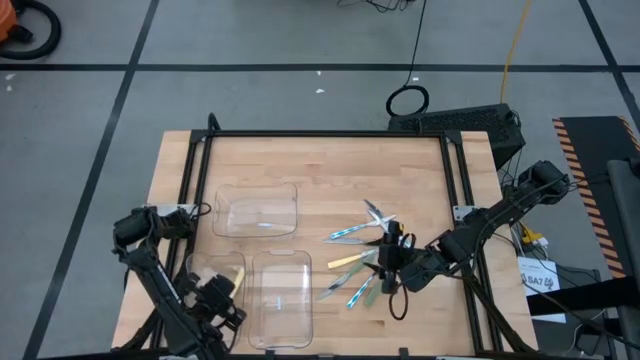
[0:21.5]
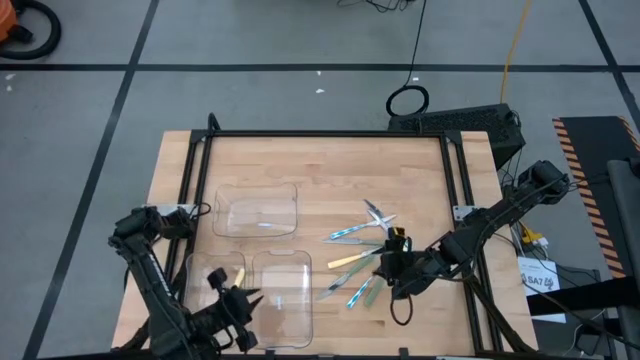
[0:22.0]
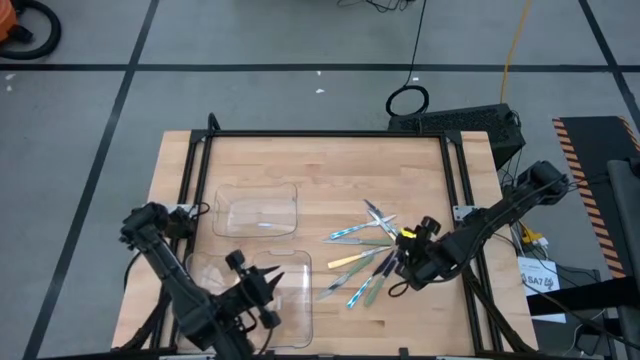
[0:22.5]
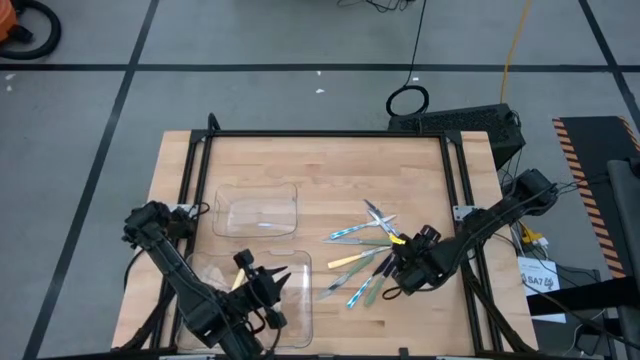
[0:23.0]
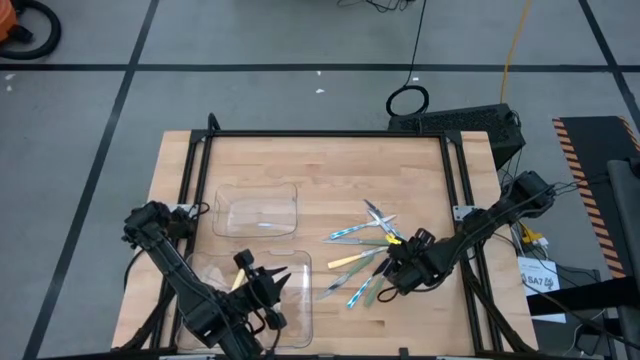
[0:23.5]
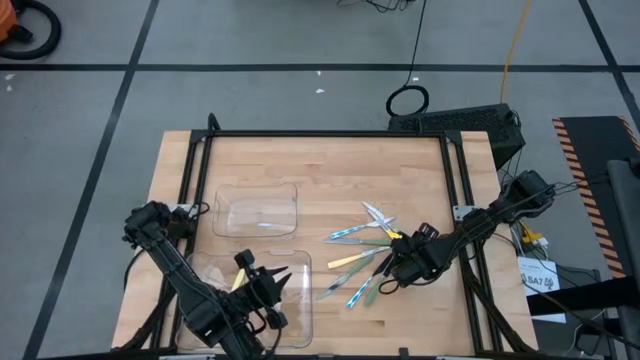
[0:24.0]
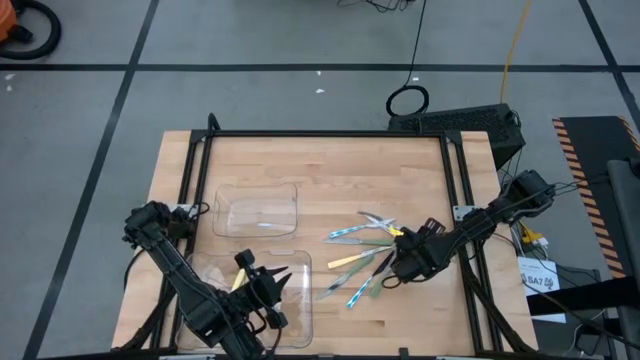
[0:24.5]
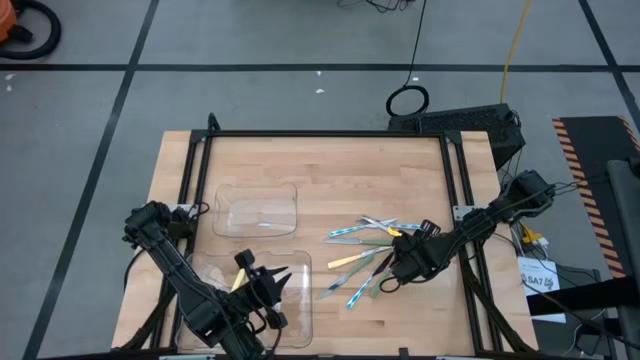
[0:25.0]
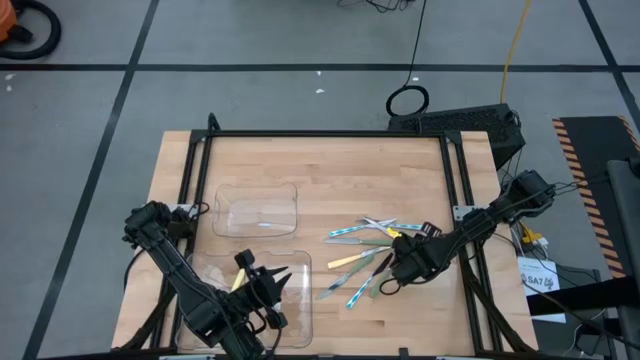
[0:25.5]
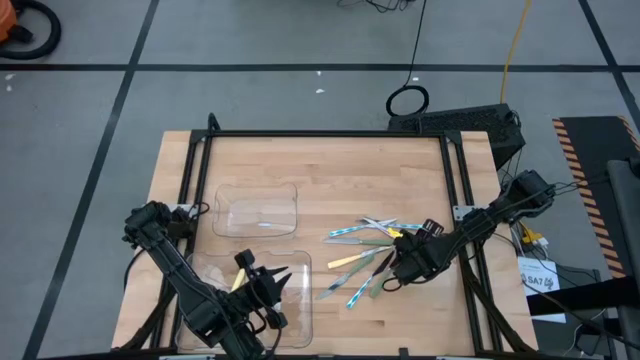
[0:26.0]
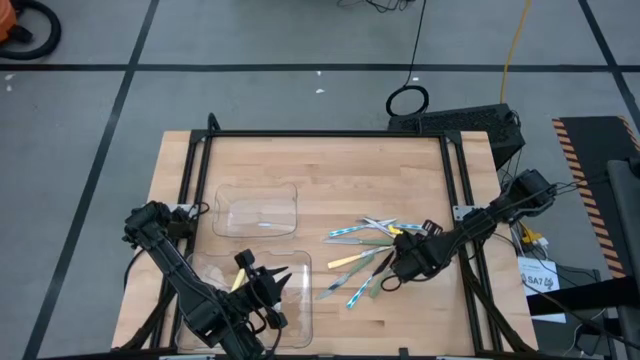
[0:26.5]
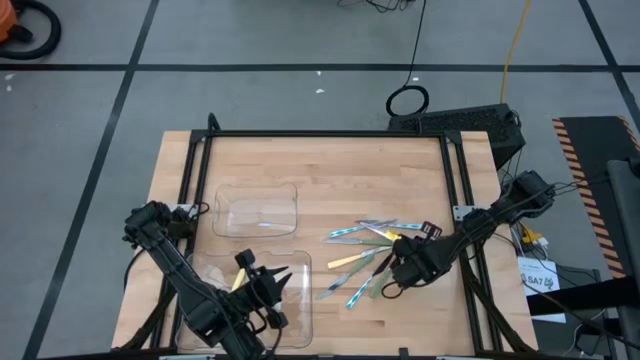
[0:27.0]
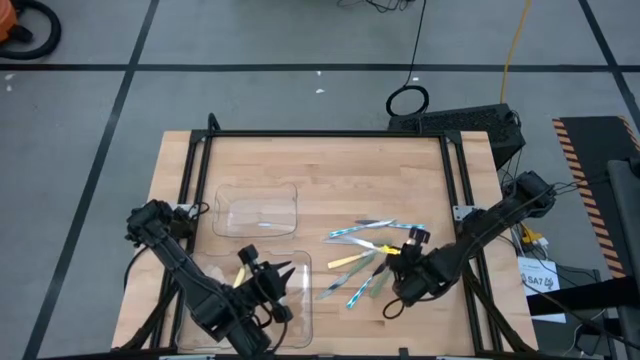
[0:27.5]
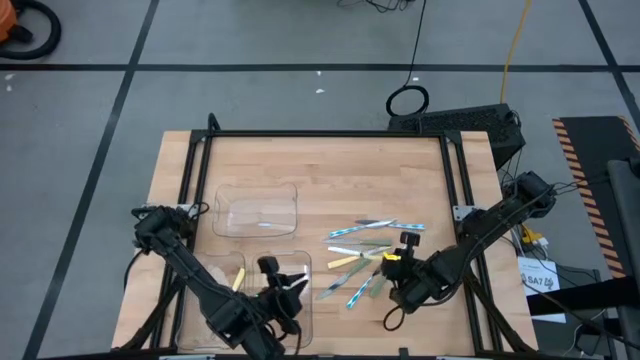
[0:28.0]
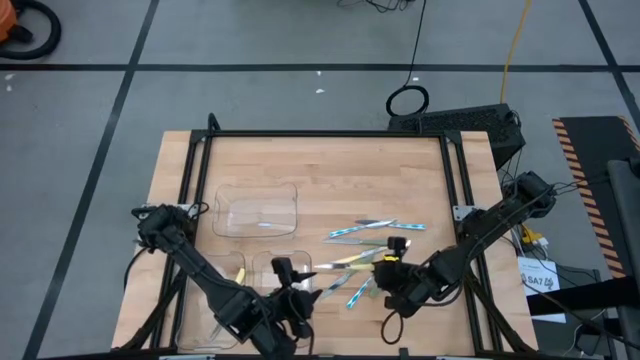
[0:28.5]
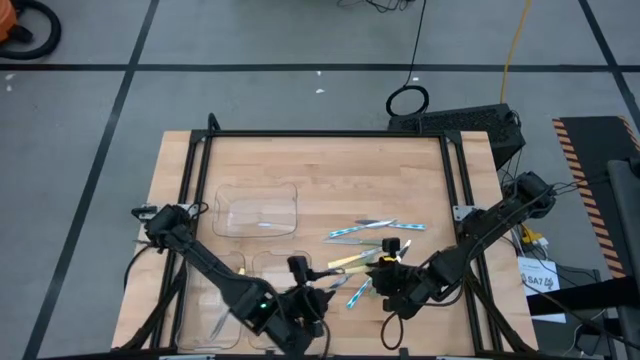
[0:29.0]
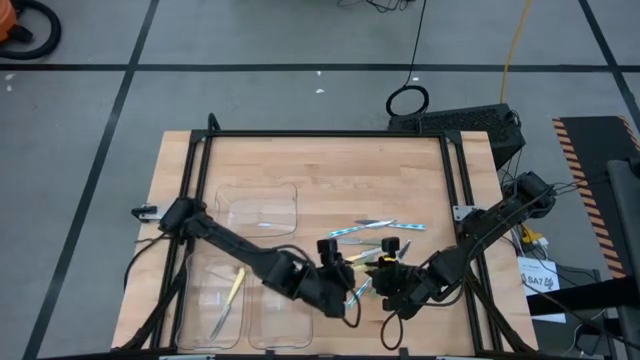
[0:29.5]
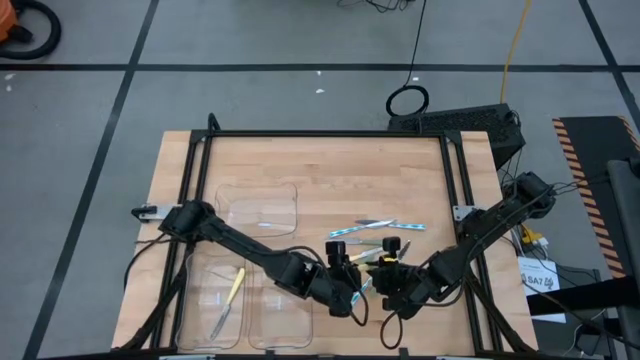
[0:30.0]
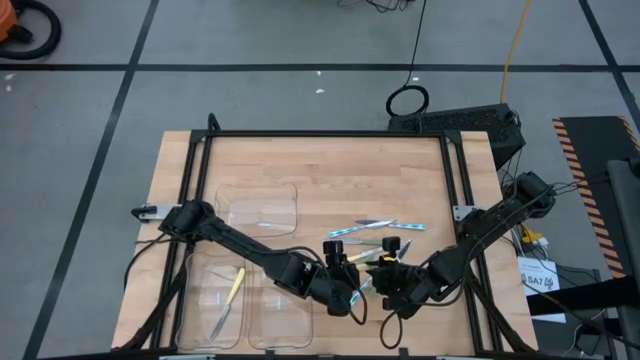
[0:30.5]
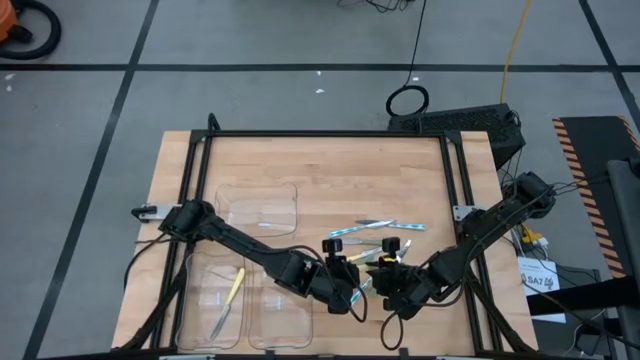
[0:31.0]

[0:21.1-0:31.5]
Task: Sort silverware by color (type)
Put the right yellow table knife into the bottom left transparent bin

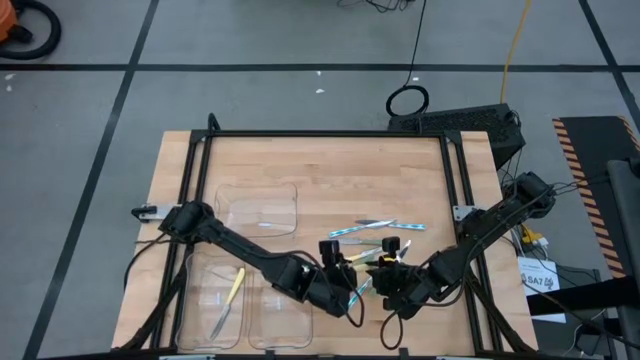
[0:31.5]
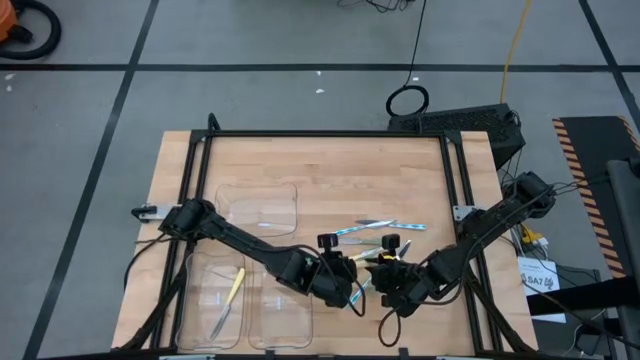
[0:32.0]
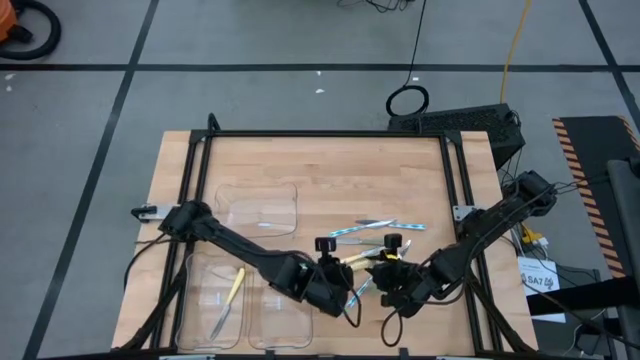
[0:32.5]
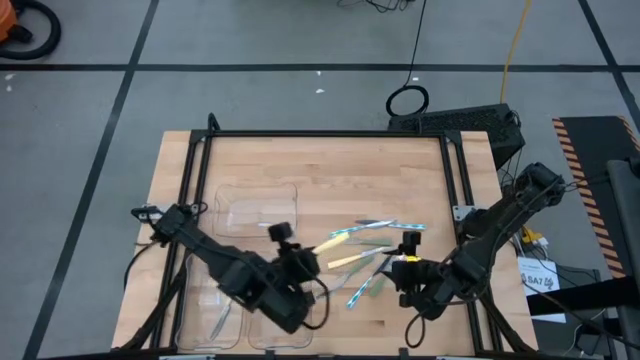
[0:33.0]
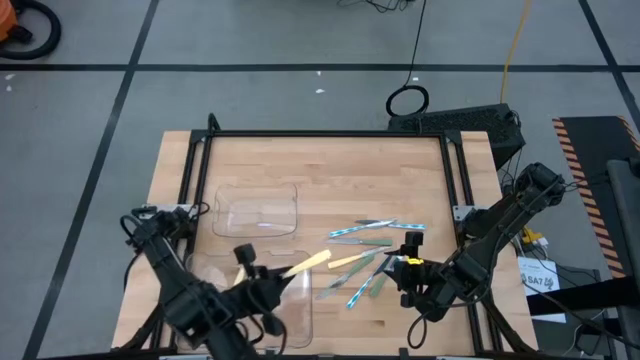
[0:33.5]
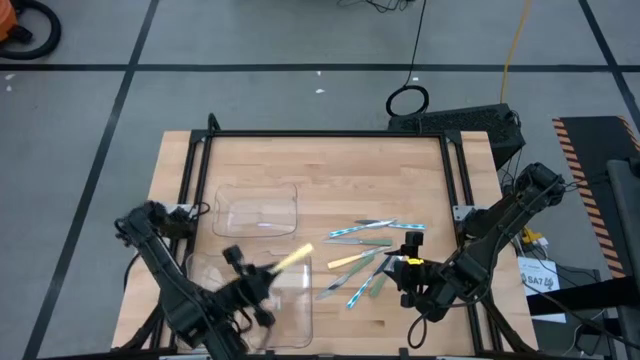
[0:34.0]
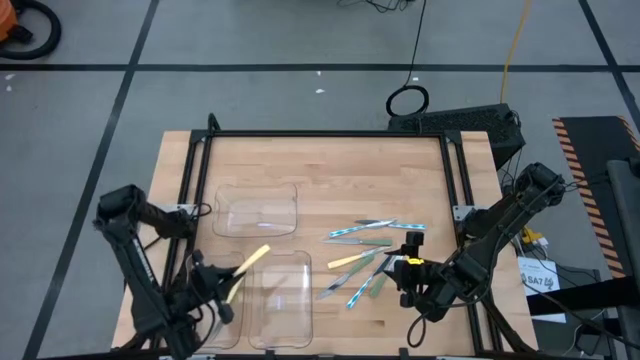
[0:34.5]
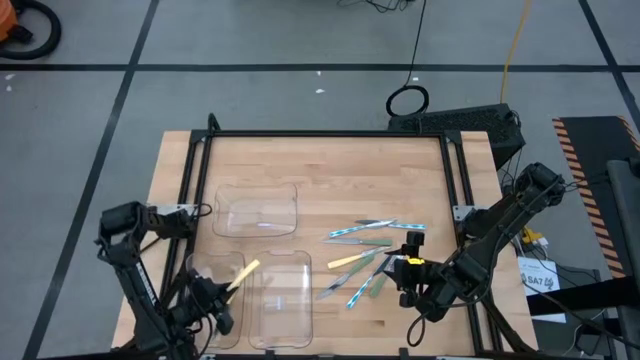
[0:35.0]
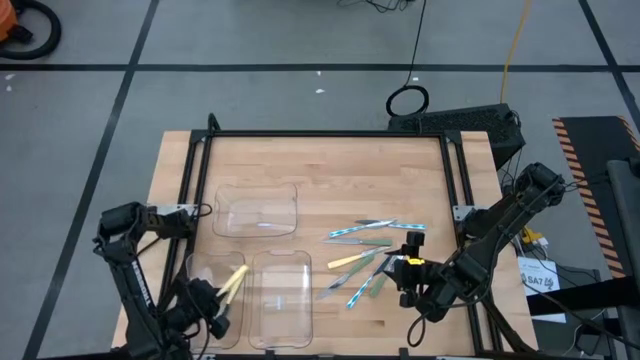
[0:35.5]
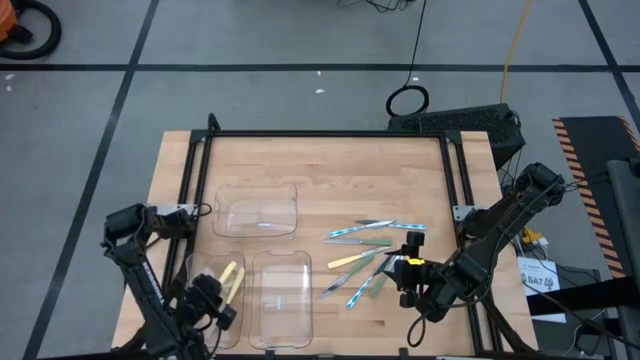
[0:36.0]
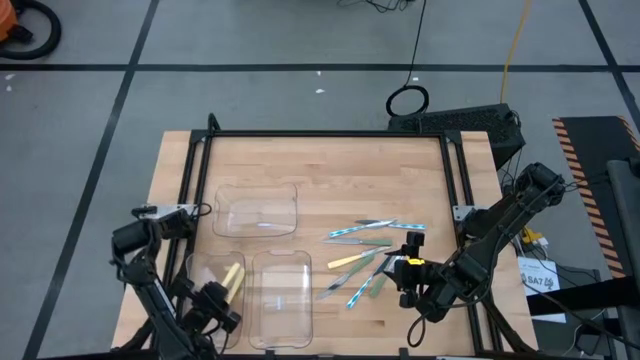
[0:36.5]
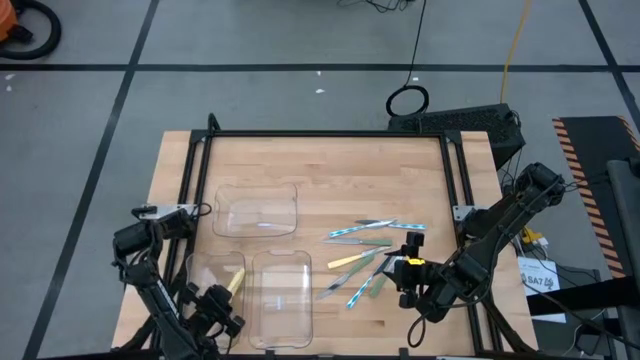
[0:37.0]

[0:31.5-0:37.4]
Put the right yellow table knife into the bottom left transparent bin

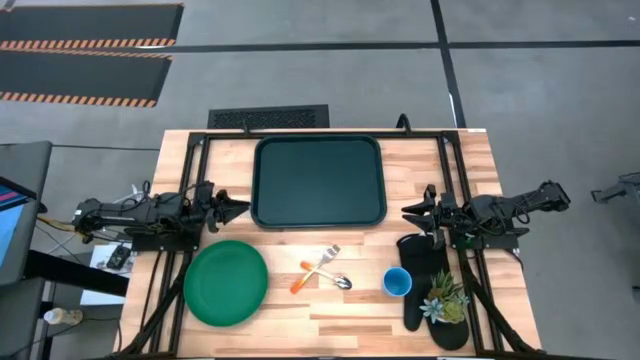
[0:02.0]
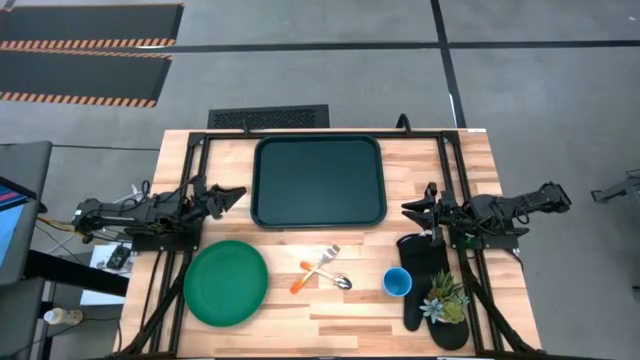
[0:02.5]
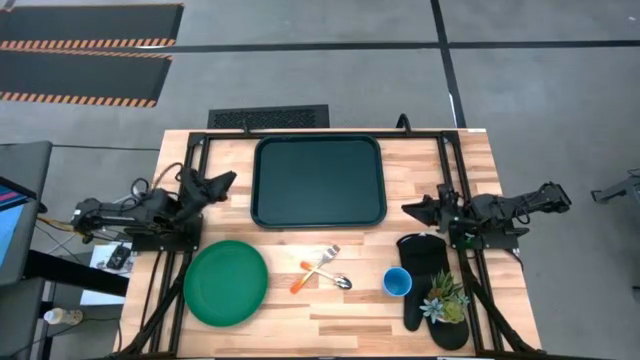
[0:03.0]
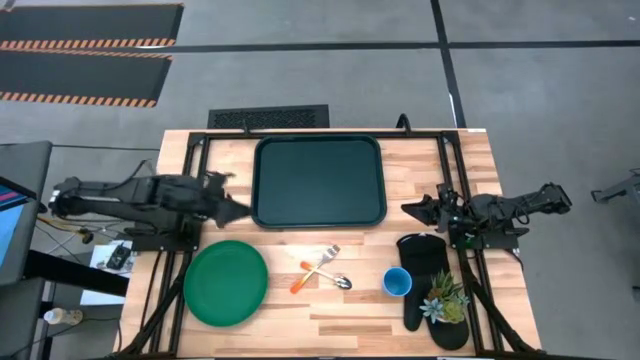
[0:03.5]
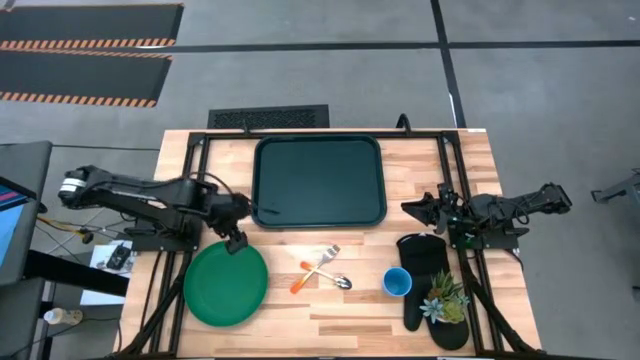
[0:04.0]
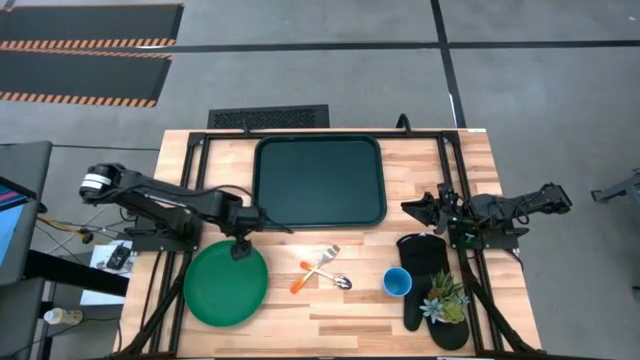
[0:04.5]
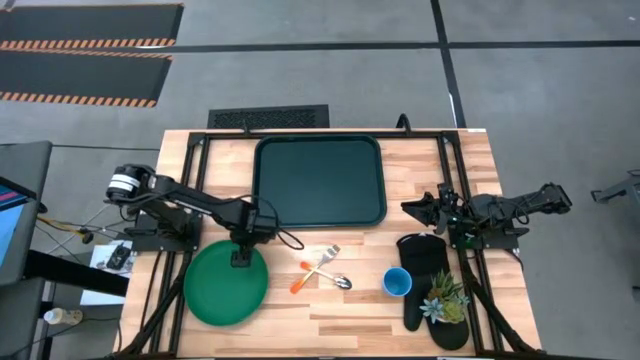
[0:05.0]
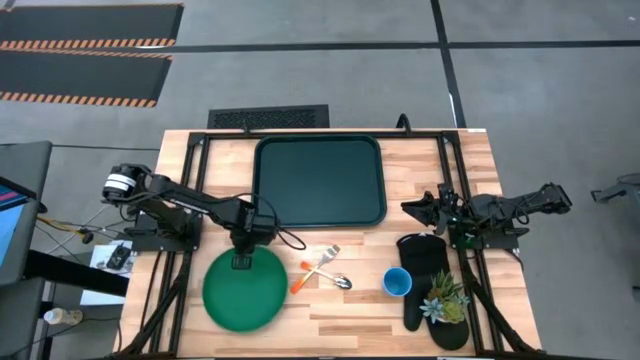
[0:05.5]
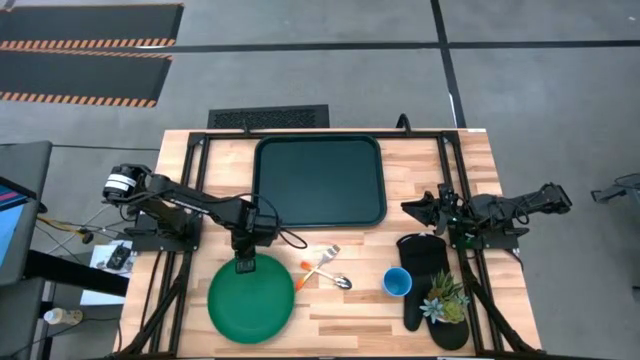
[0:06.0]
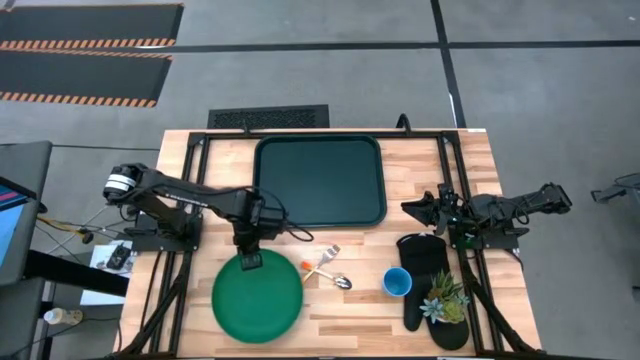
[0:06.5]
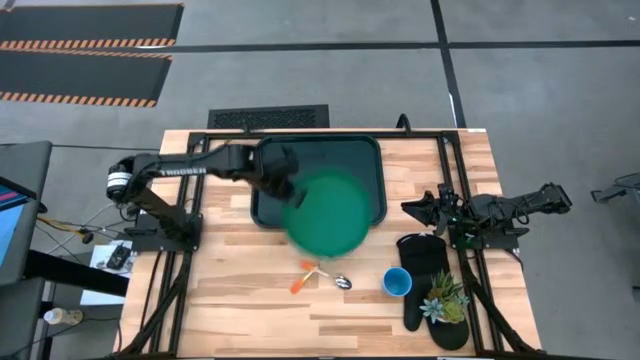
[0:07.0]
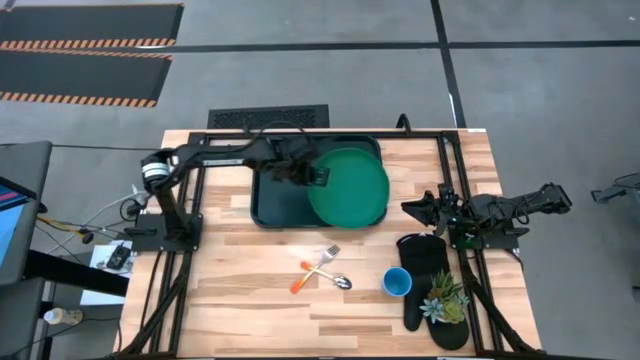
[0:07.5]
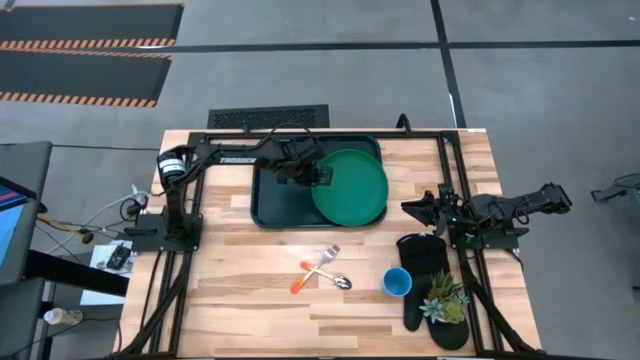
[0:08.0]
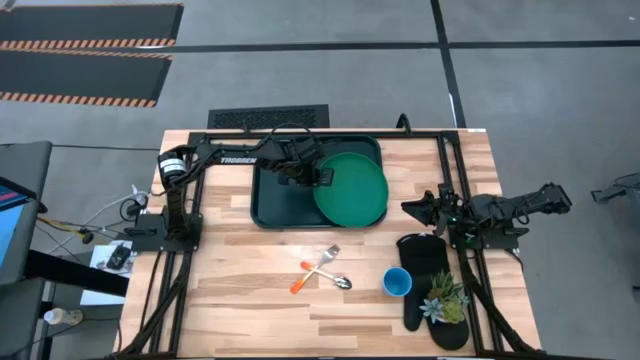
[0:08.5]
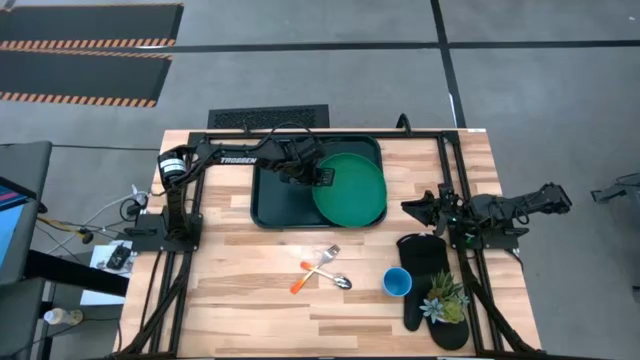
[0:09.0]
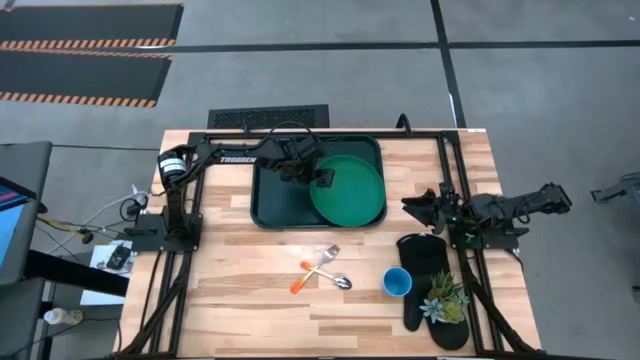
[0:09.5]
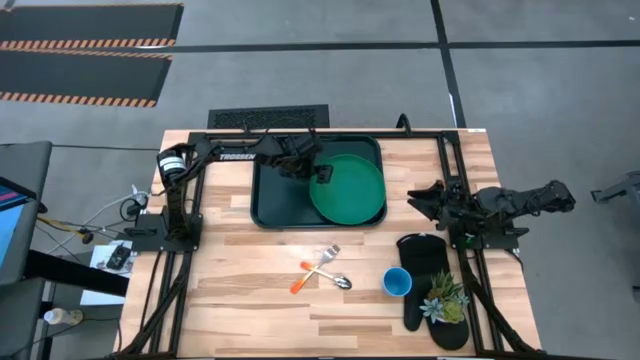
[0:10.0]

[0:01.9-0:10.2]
Task: Pick and place plate/cup/fork/spoon on tray
Put the green plate on the black tray
